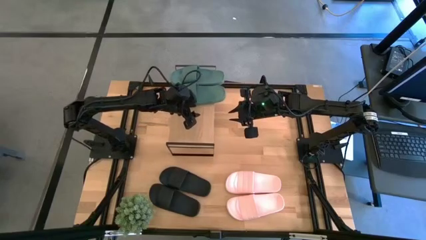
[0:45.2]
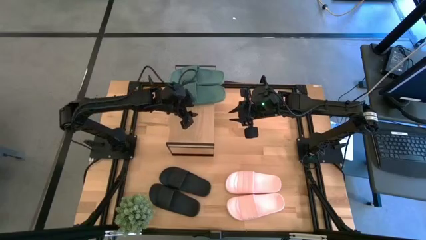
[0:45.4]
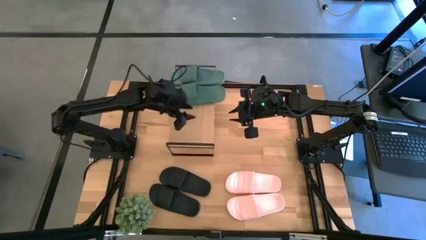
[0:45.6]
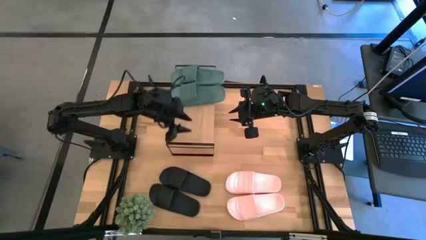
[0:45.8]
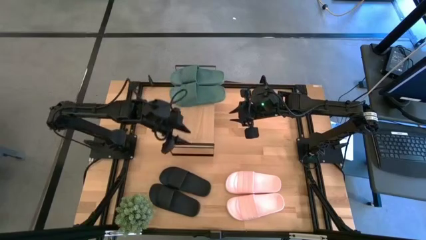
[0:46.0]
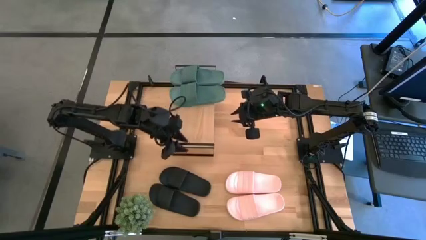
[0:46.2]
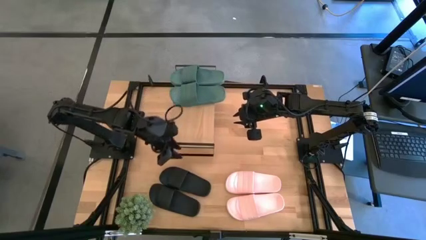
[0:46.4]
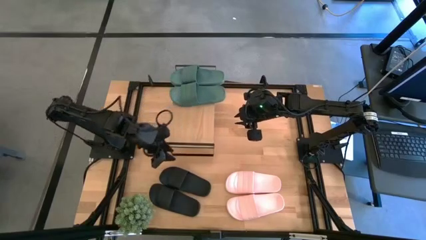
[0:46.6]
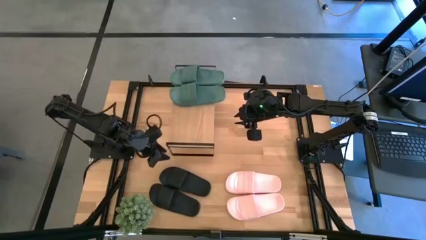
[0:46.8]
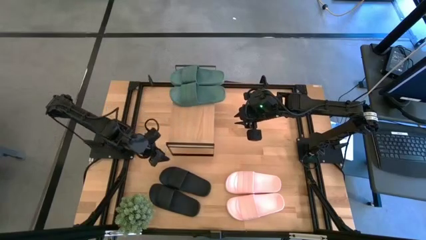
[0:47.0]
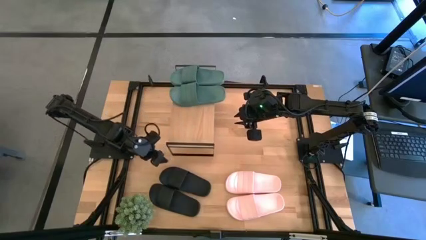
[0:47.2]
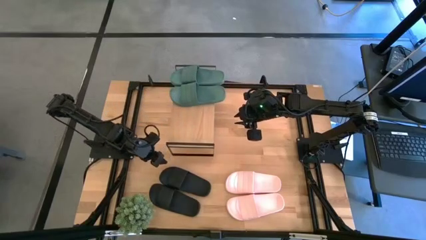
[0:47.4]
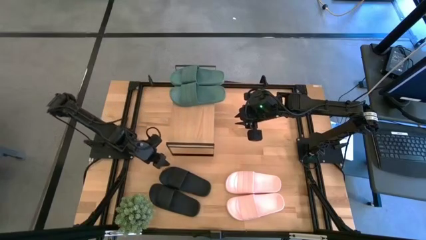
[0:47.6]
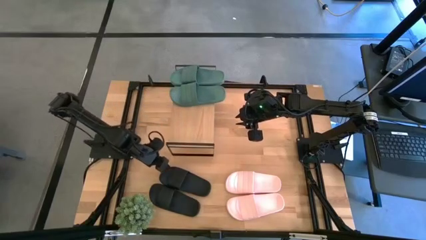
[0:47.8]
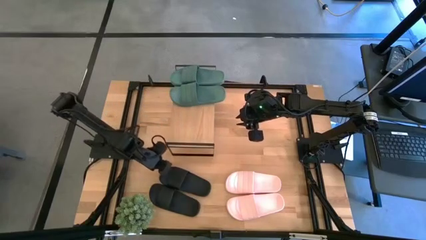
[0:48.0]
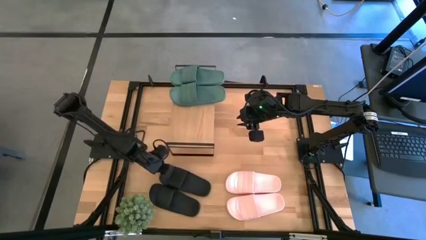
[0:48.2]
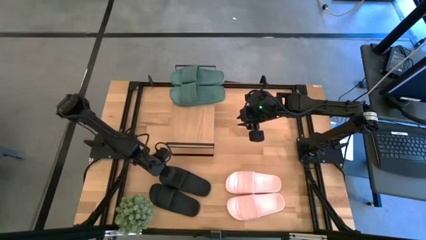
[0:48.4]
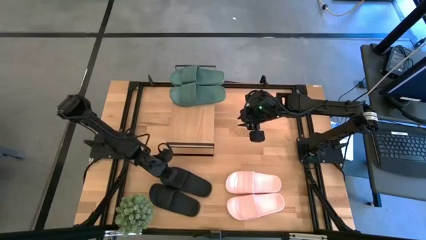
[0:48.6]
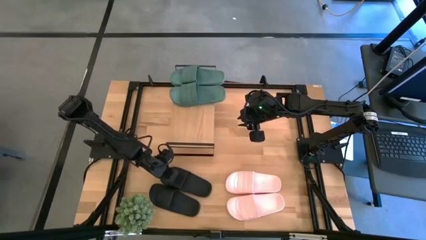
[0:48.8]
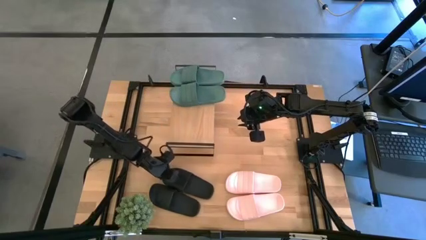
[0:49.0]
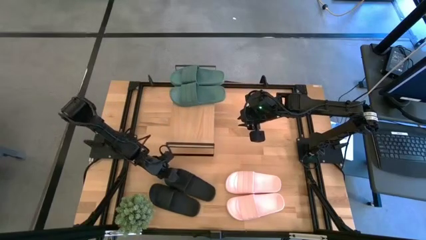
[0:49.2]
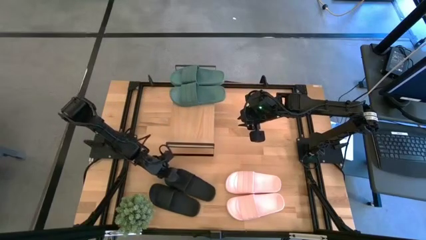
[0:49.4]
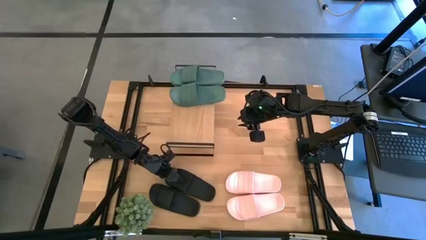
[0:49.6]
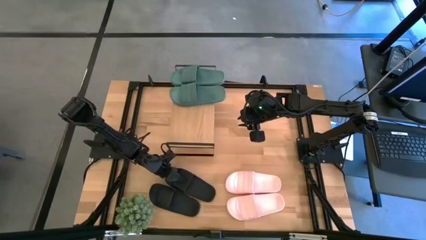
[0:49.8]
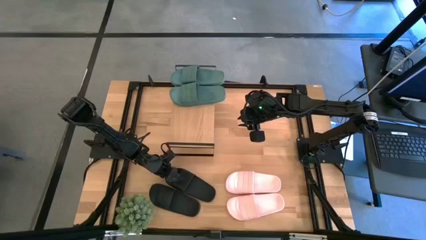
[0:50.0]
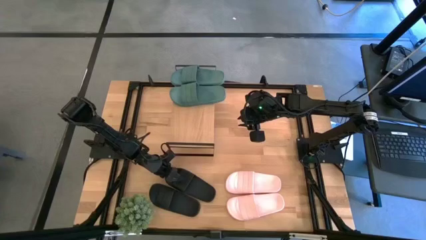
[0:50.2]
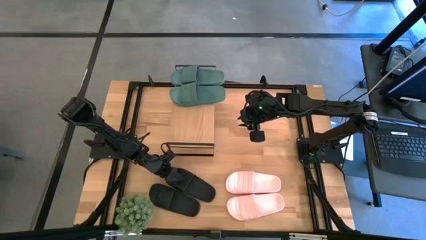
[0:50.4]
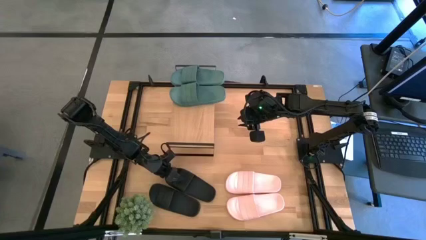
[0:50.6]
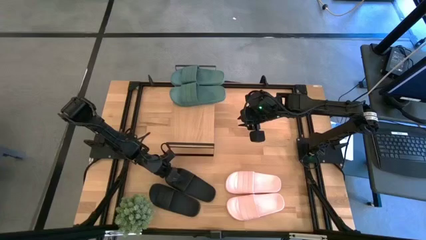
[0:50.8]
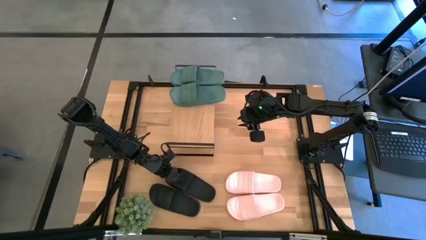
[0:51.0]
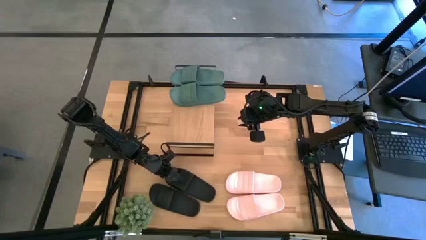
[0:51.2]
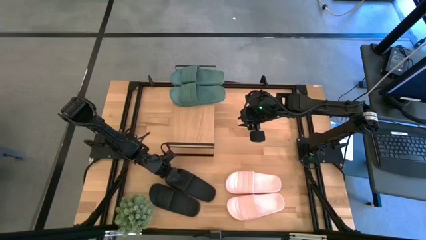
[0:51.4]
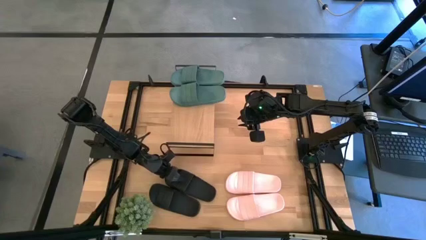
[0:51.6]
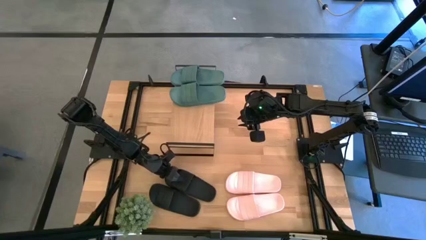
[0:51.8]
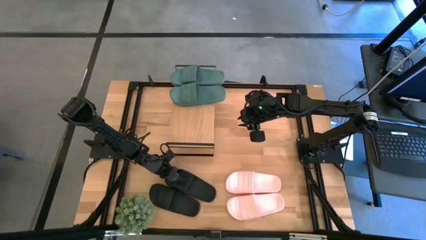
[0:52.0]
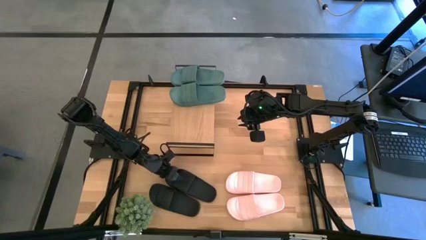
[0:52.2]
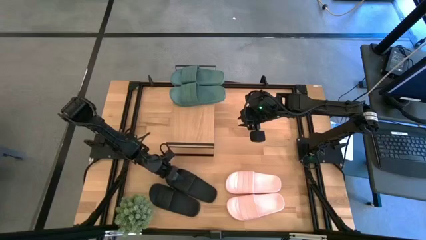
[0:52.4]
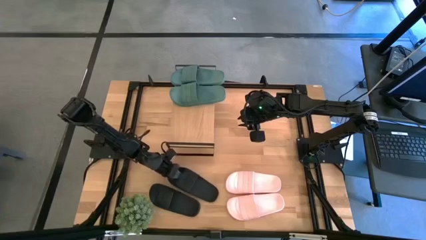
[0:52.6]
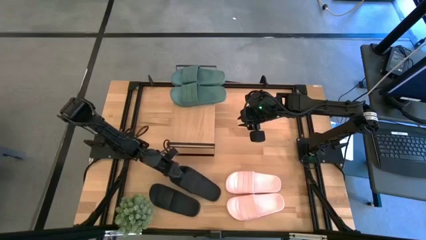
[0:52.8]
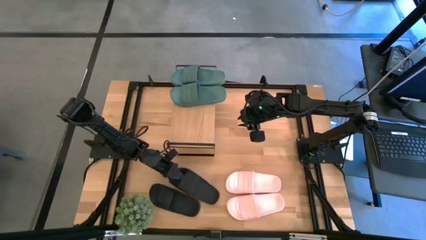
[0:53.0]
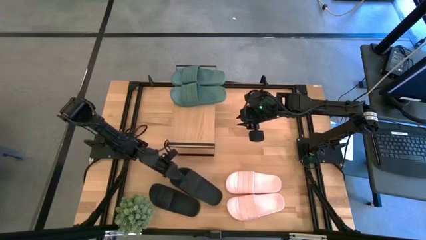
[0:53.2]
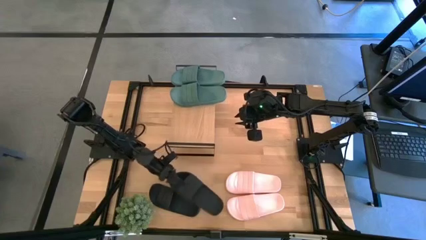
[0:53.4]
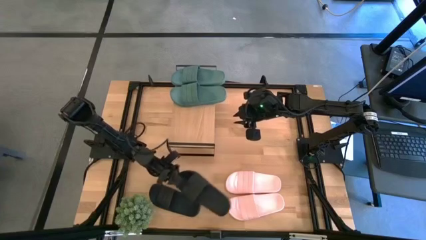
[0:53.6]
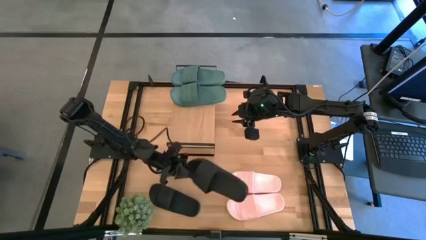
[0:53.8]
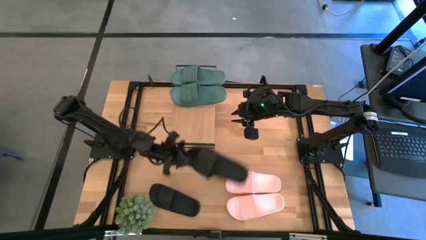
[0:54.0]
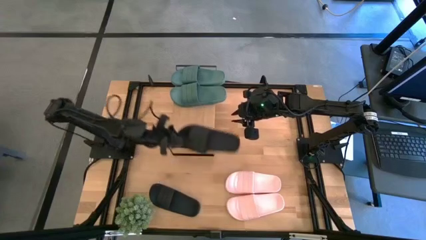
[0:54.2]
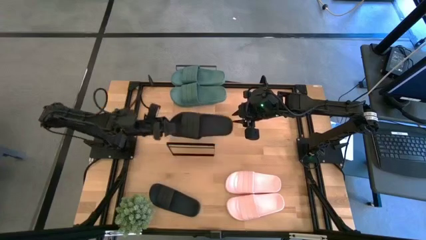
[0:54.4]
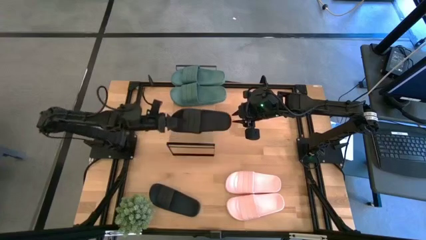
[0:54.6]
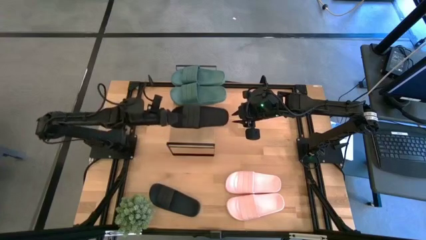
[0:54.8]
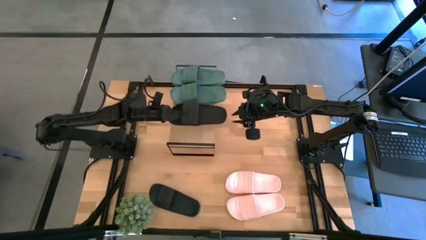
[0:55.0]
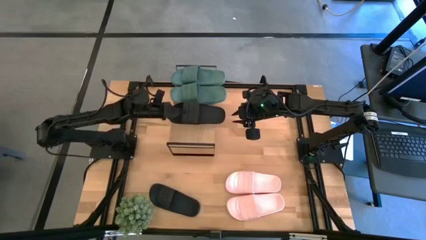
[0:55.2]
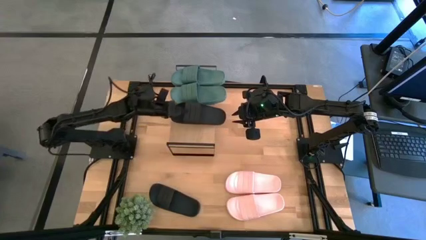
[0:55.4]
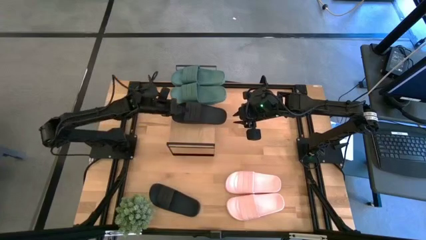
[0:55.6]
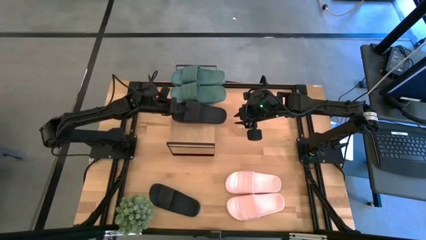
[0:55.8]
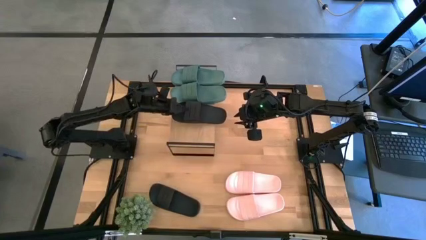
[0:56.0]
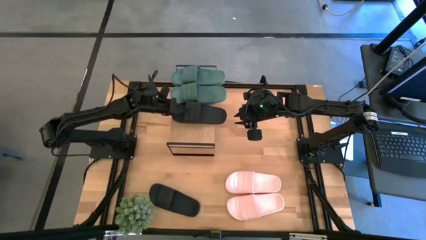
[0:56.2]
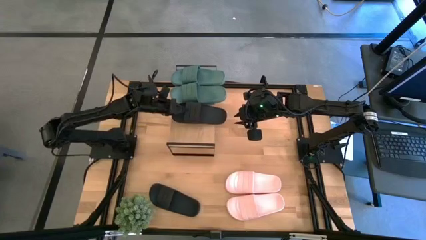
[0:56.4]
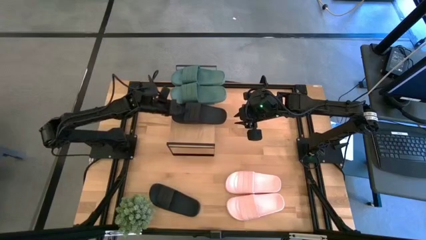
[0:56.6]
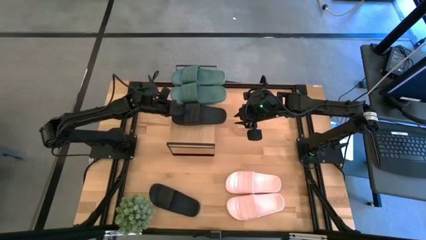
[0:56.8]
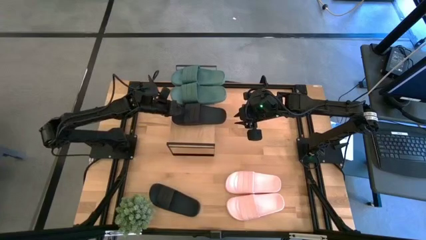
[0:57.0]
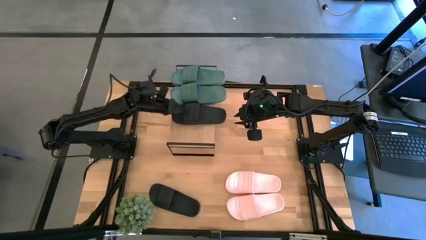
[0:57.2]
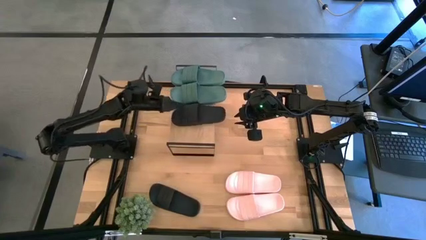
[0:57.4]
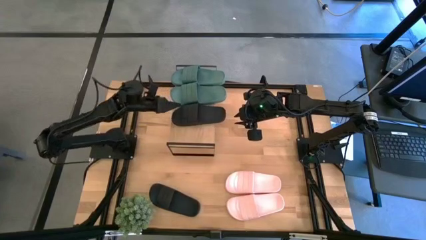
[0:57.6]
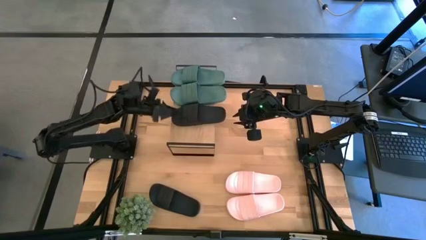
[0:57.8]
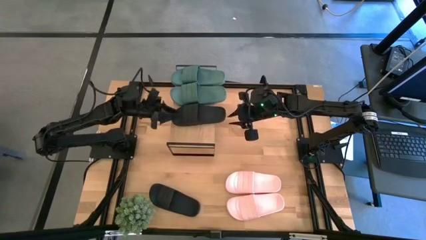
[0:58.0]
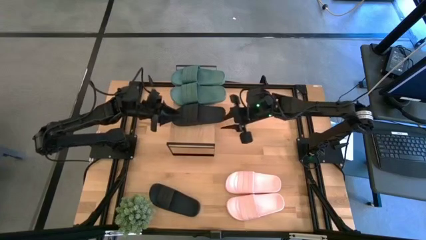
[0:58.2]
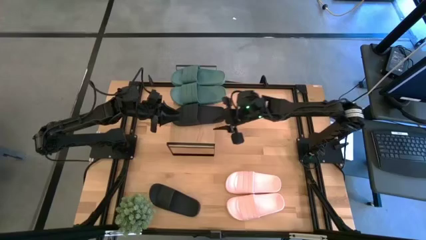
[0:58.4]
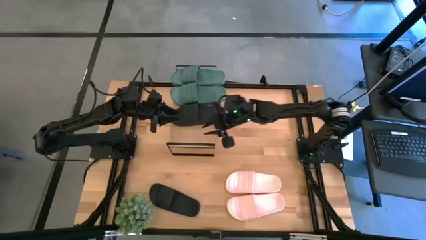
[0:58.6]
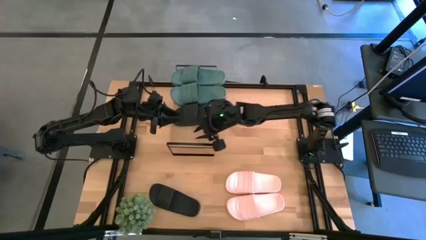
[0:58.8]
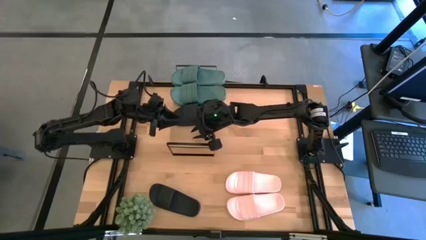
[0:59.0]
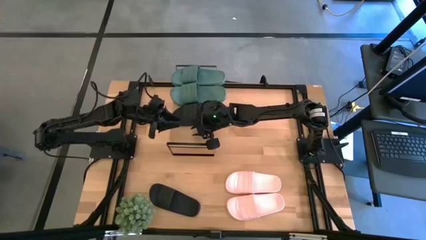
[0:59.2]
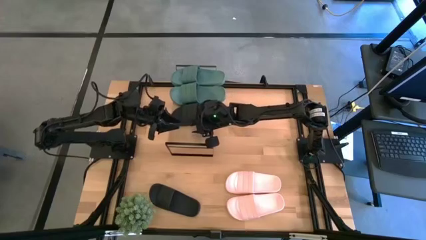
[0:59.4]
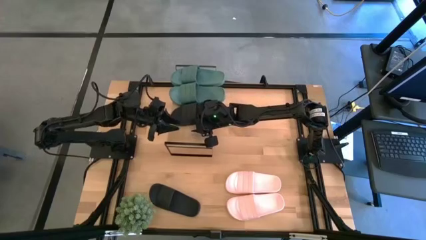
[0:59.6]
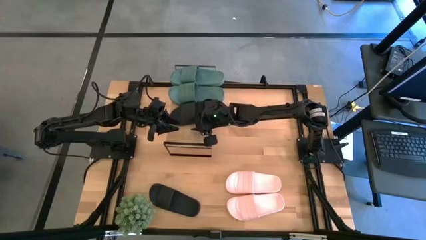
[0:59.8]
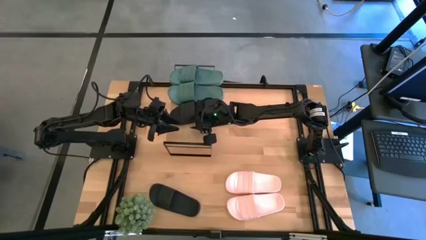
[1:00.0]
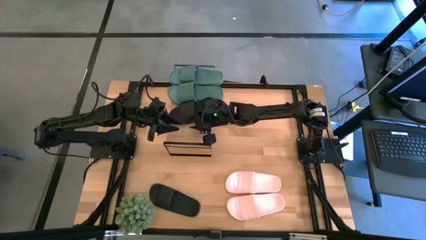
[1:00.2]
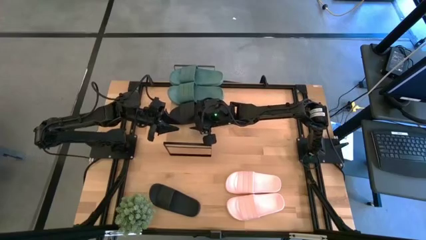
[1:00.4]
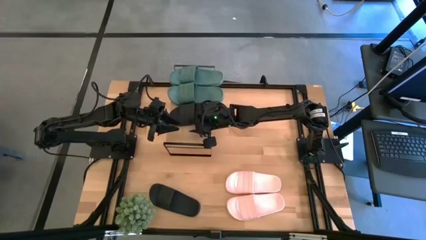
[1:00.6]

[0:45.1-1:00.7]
Task: Pick and place slides into the shelf
Put the right black slipper on the shelf
